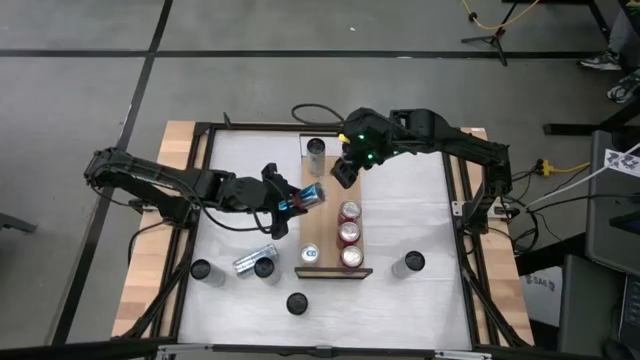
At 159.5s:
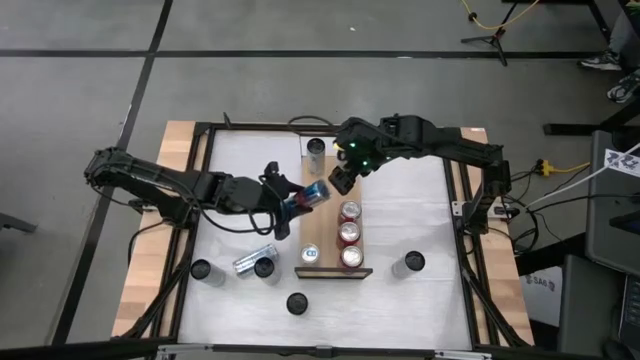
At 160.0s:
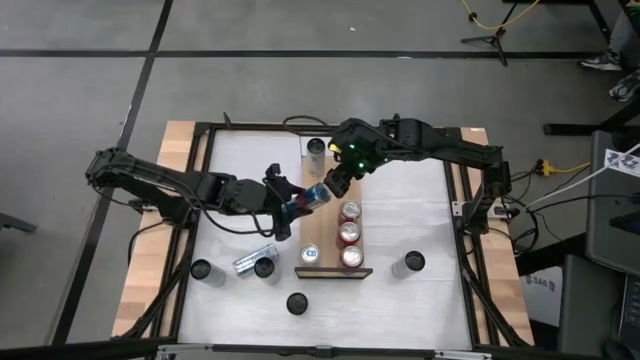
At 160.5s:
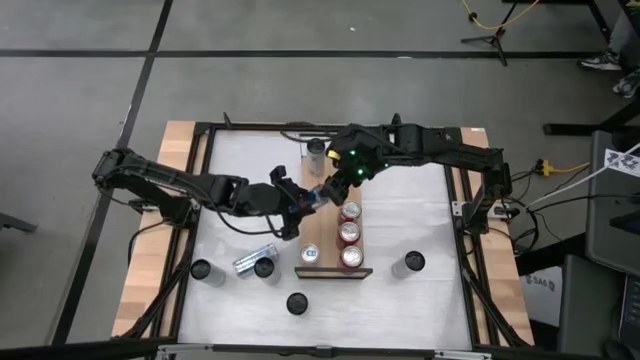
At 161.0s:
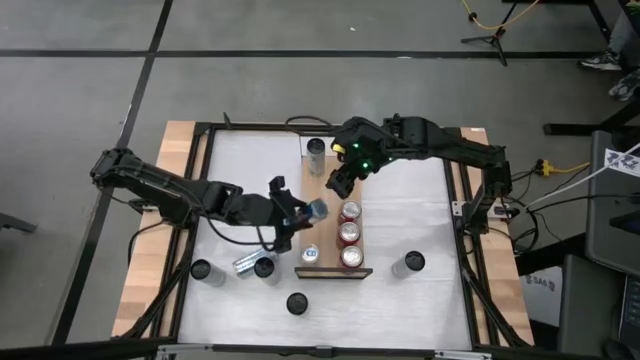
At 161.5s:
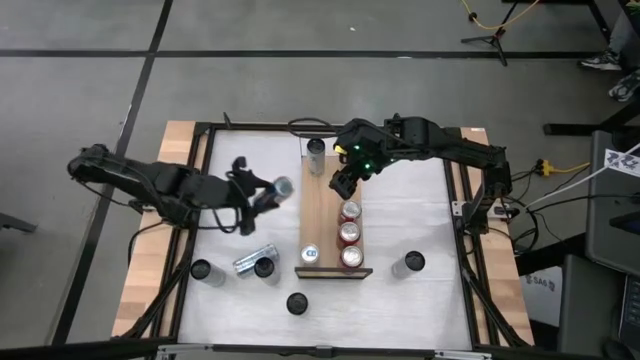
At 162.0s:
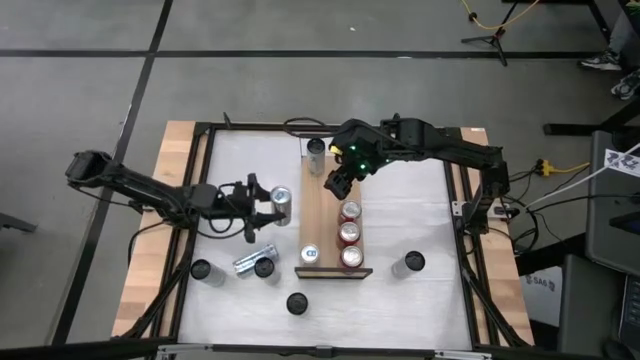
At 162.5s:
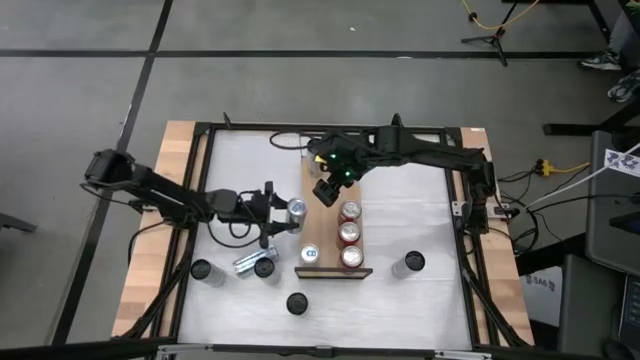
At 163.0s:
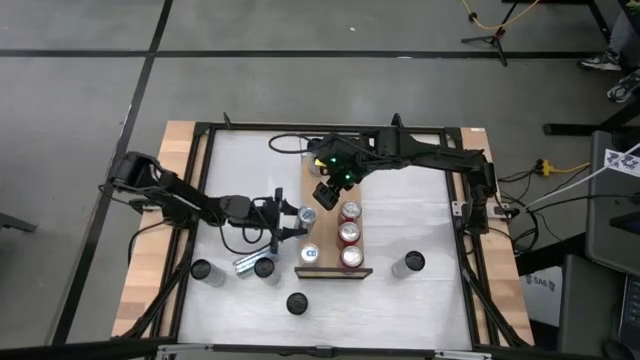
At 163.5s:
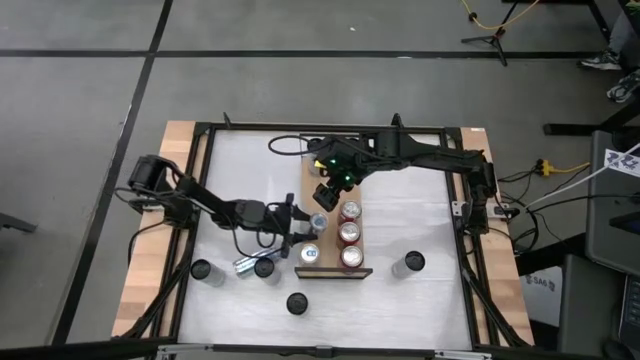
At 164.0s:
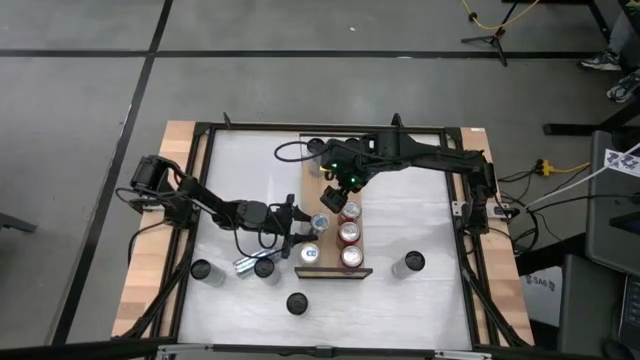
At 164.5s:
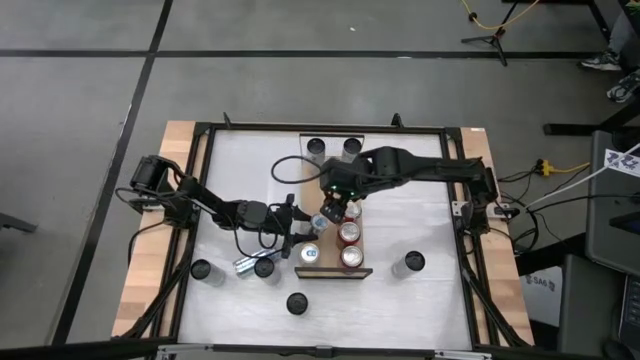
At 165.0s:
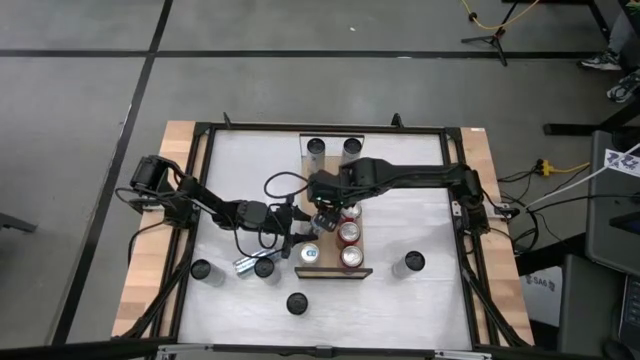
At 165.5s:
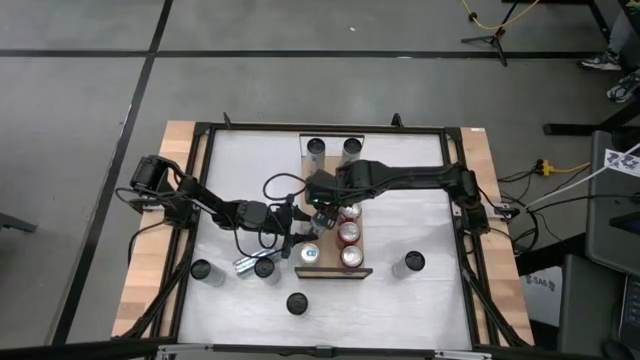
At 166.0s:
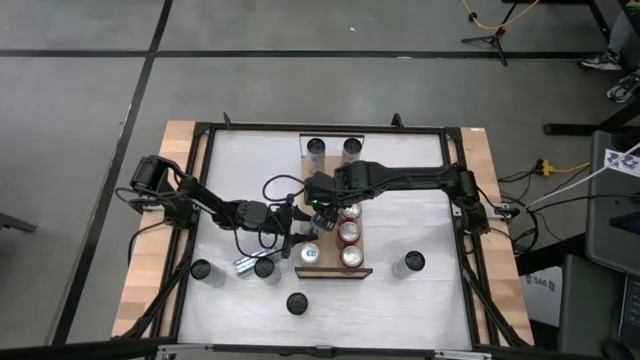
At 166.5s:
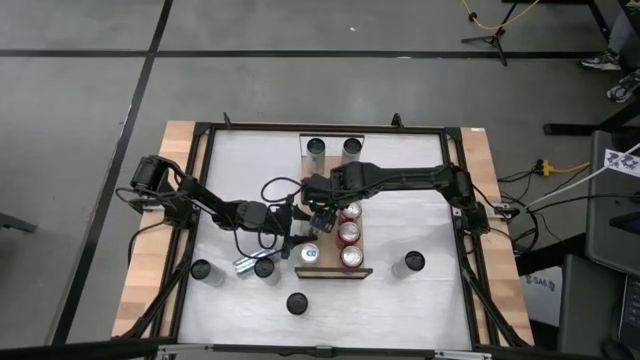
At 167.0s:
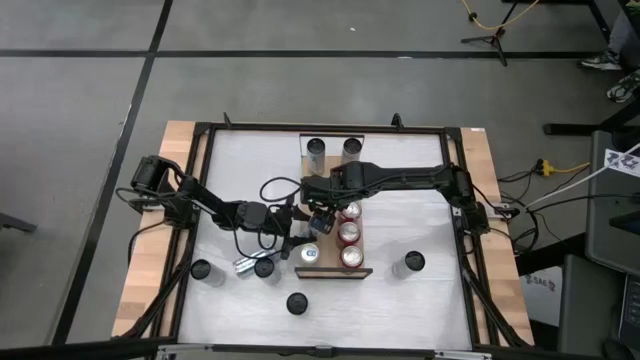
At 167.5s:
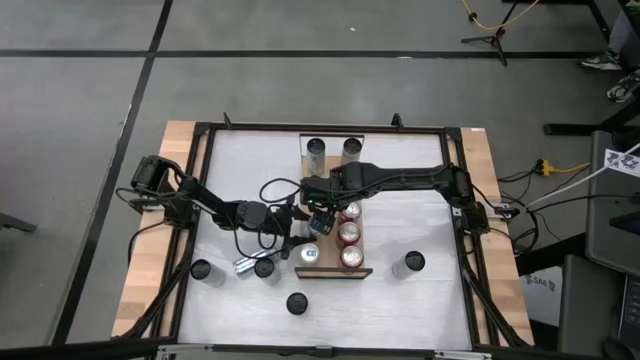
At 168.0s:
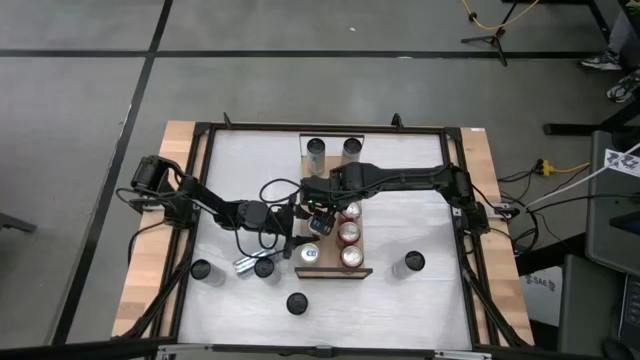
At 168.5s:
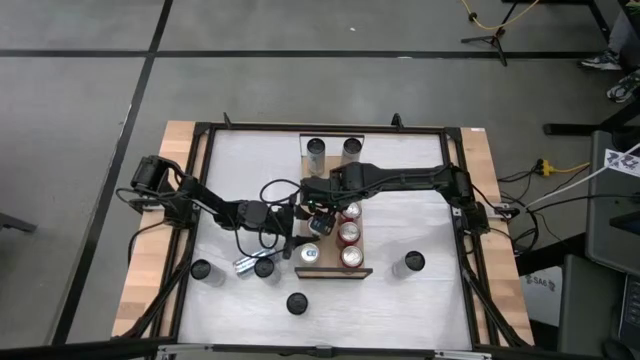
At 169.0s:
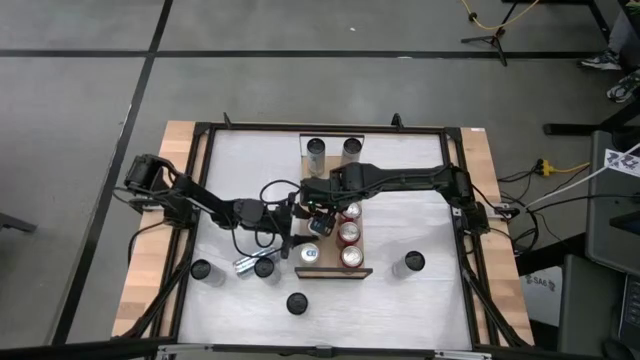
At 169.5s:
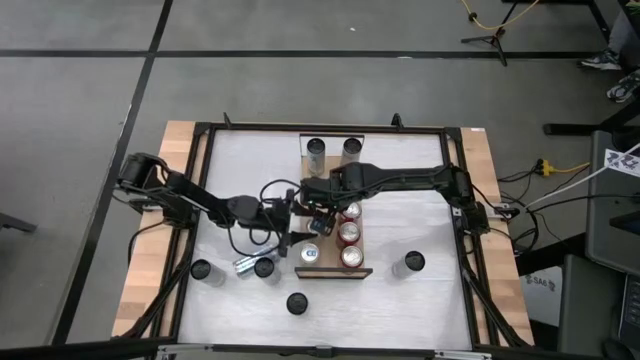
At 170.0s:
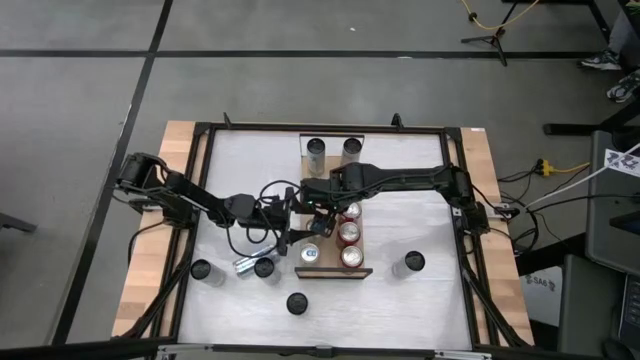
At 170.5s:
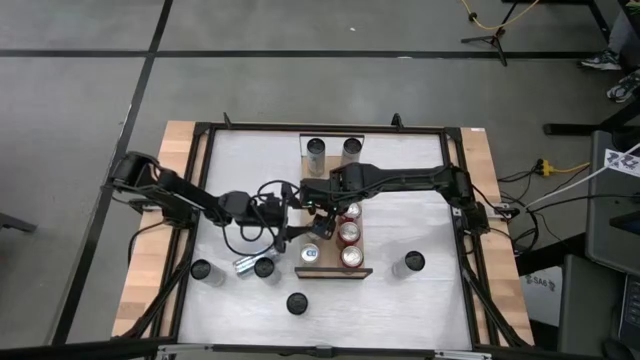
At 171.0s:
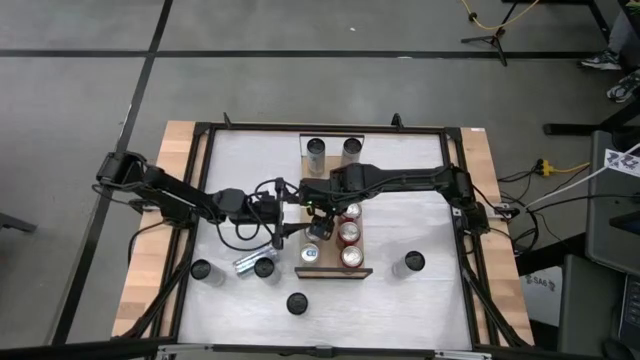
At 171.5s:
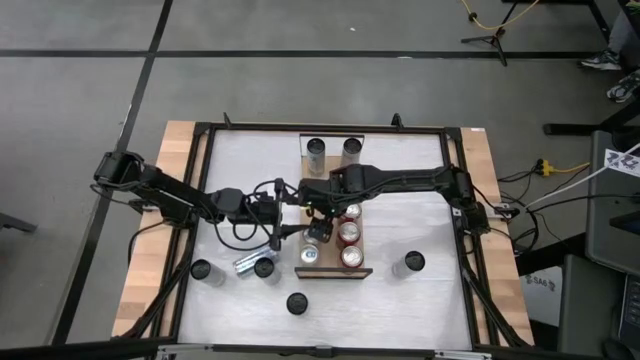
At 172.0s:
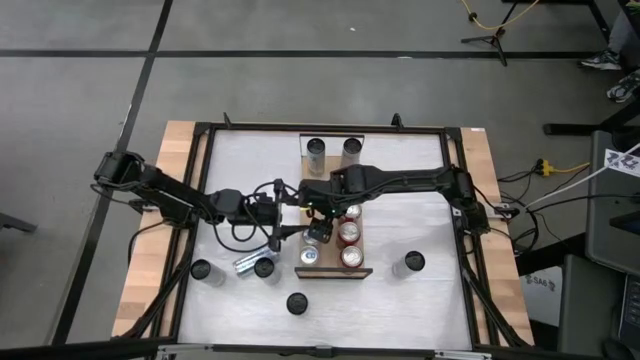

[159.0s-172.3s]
Task: Place canned beverage on shelf
Put the blue soda can on the shelf aligned with the other blue soda can

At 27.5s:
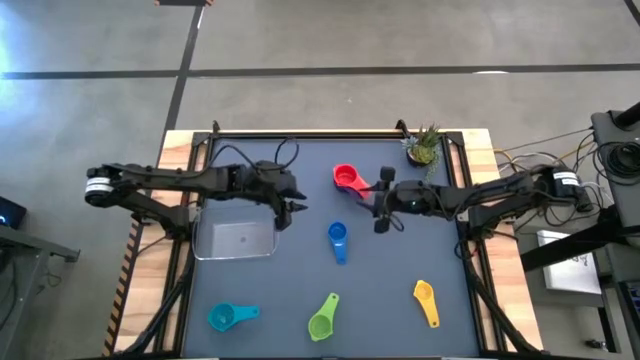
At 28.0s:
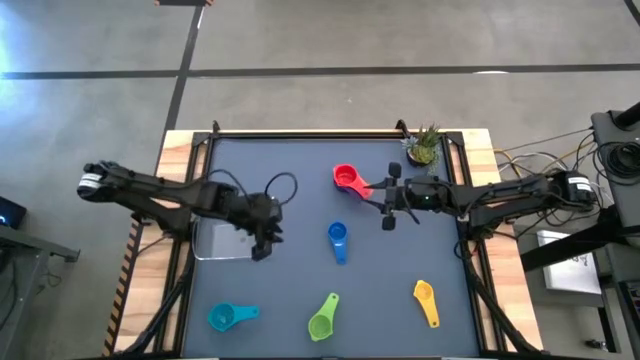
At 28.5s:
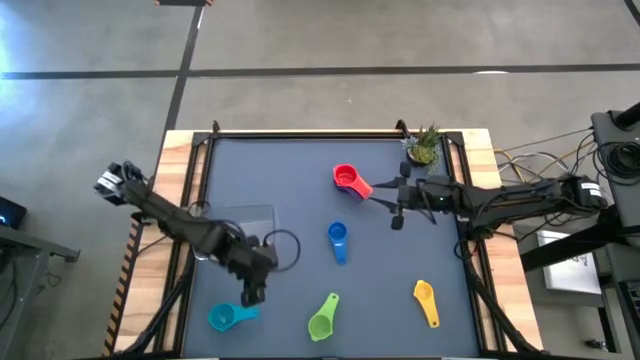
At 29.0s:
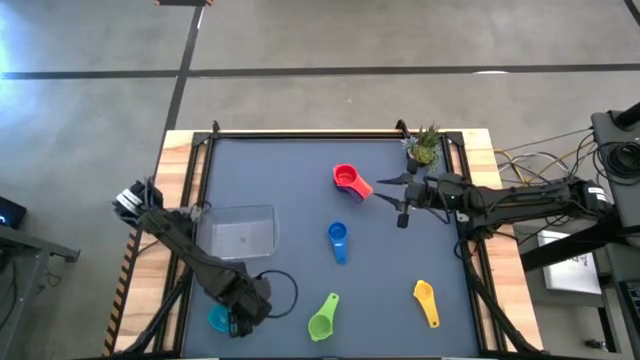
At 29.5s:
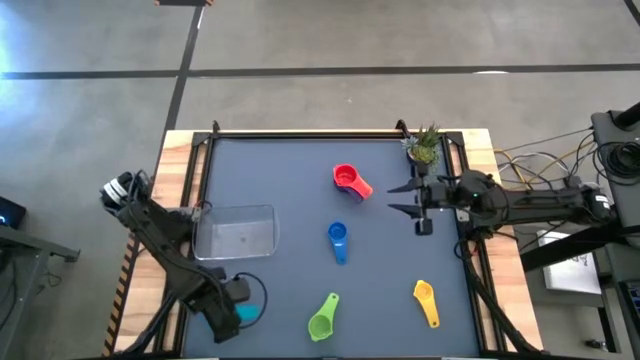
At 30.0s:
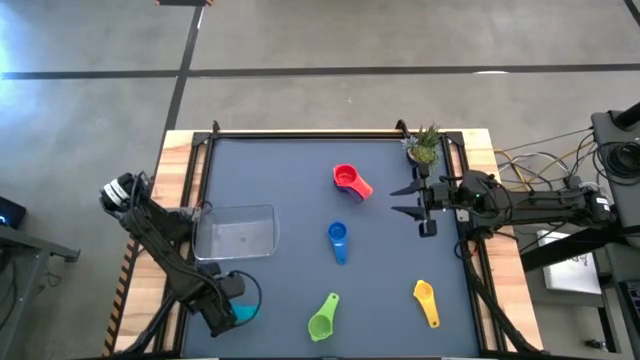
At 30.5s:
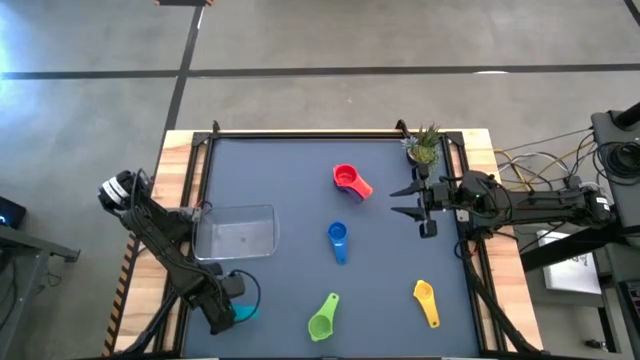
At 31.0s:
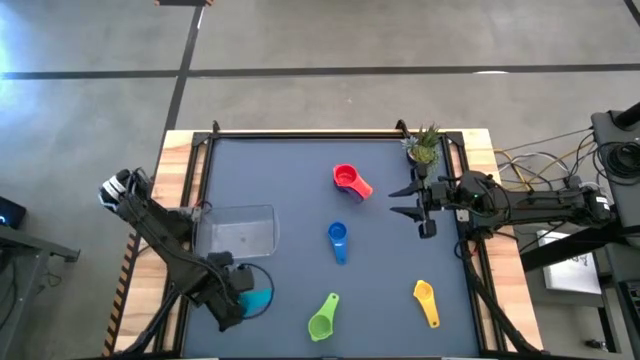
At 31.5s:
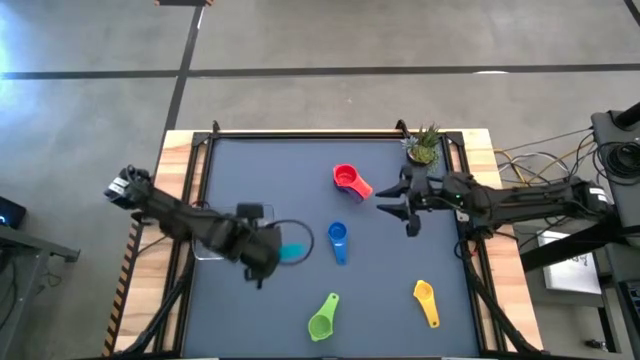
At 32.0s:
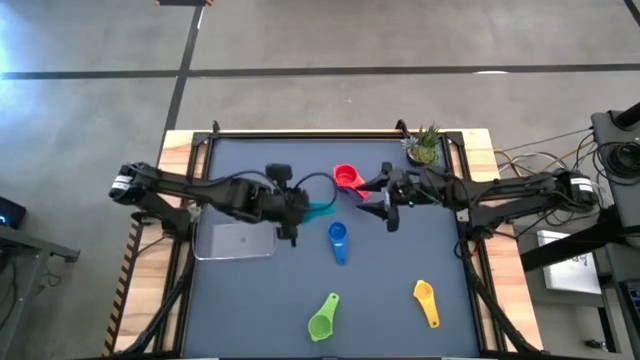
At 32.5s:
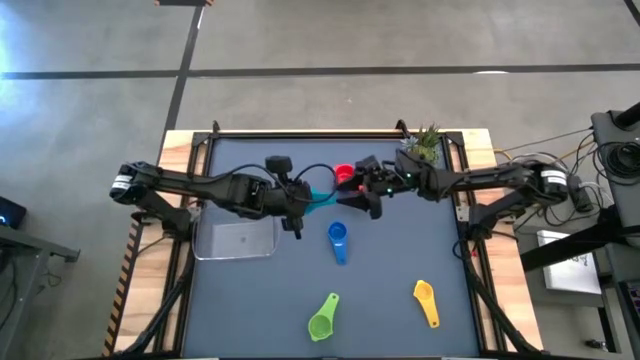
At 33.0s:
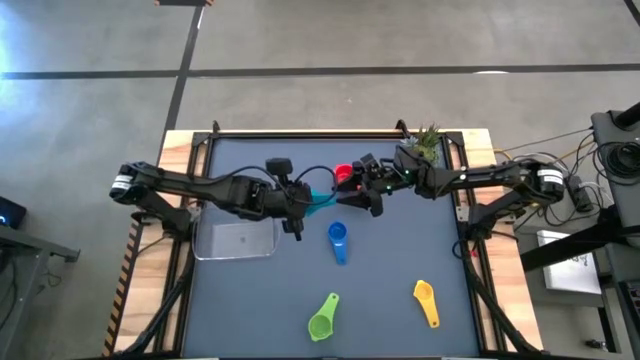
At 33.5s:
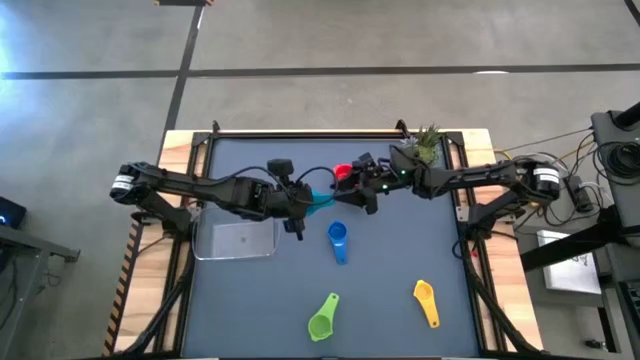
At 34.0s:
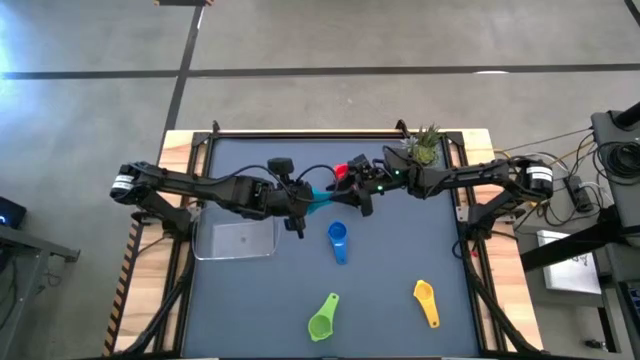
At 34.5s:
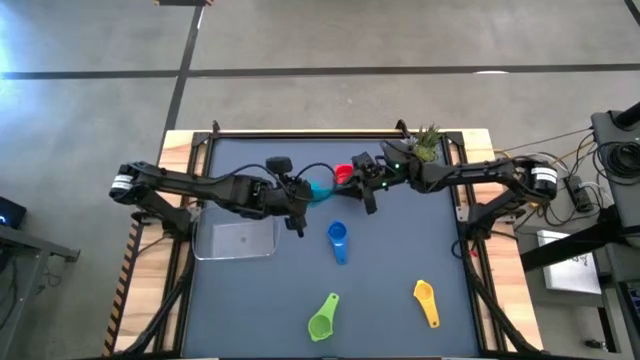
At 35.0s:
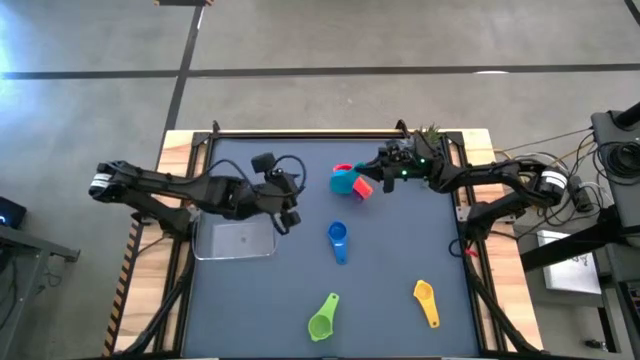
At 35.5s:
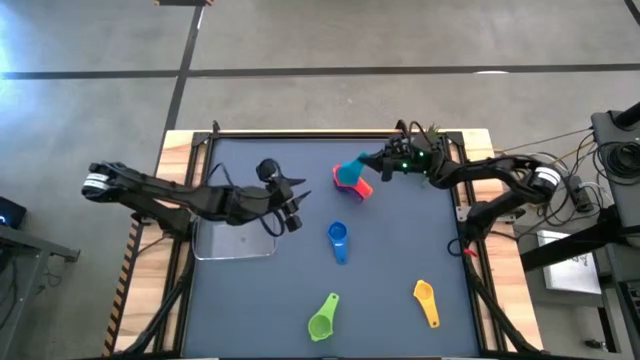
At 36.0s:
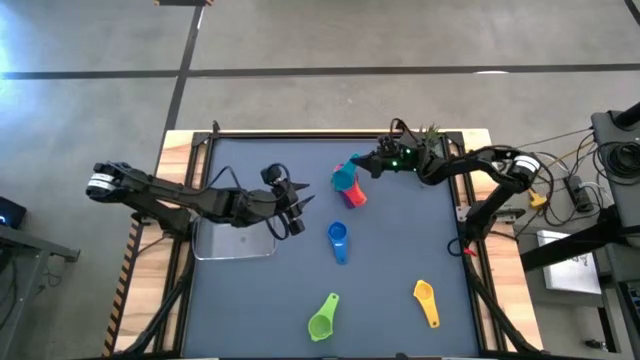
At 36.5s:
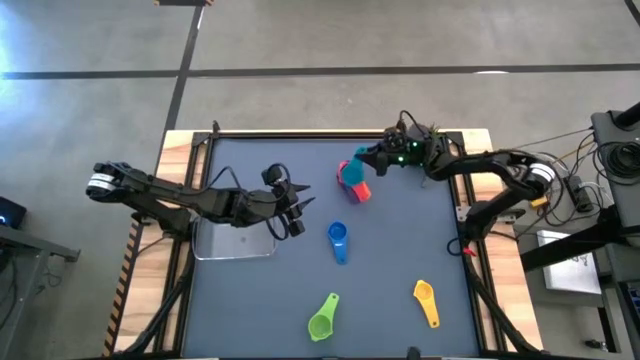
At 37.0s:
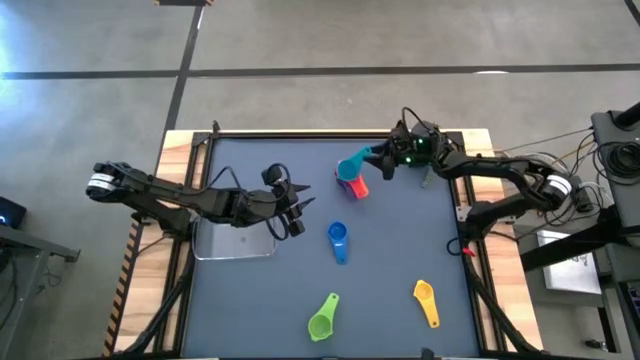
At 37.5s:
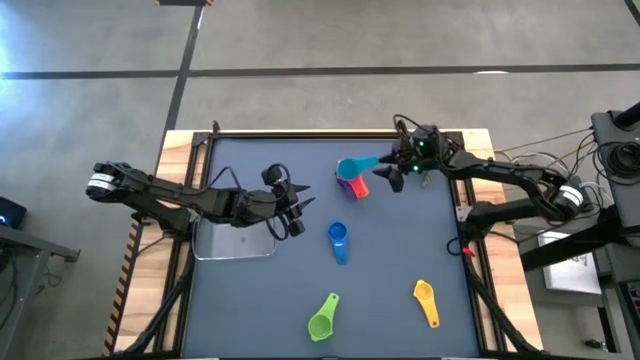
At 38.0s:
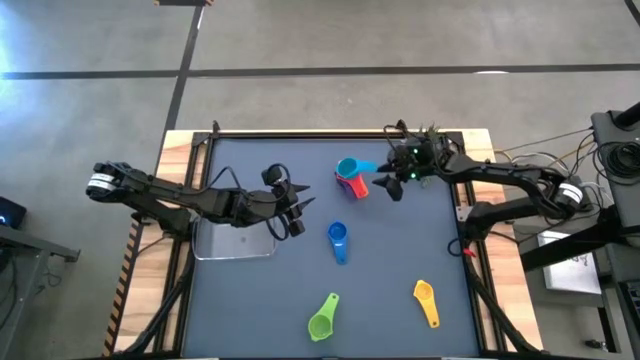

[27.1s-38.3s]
Task: Nest measuring cups in basket
Stack the light blue measuring cup on top of the red measuring cup
